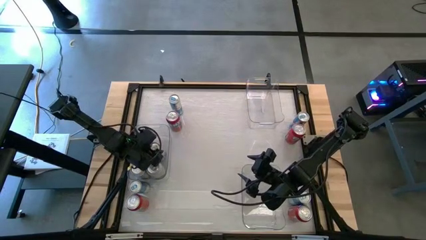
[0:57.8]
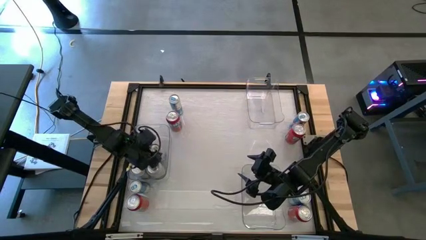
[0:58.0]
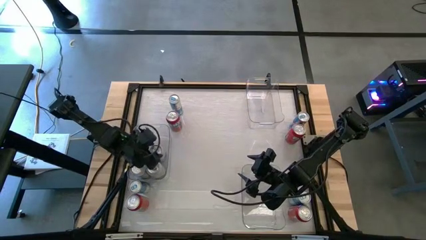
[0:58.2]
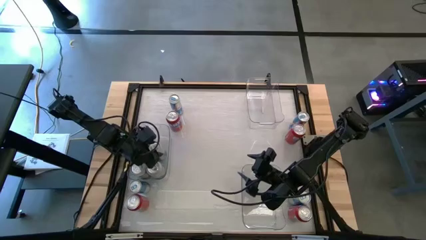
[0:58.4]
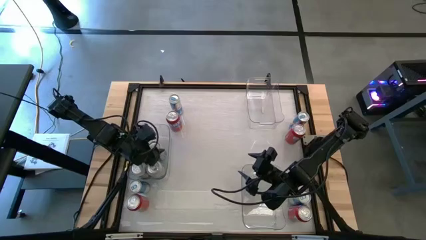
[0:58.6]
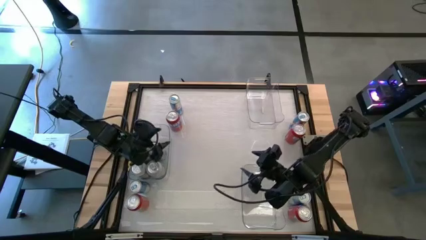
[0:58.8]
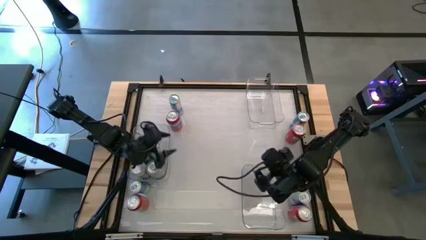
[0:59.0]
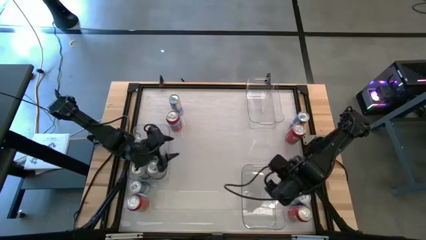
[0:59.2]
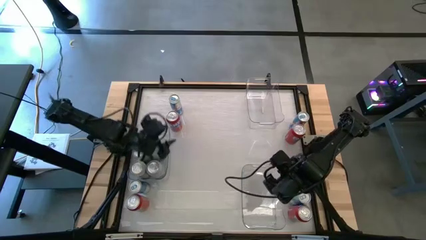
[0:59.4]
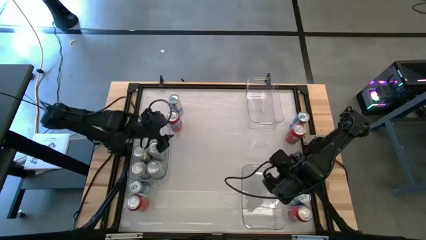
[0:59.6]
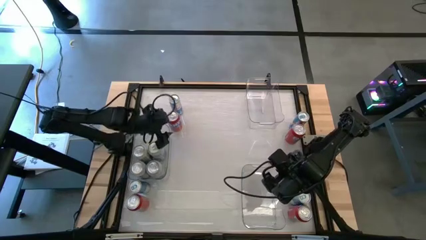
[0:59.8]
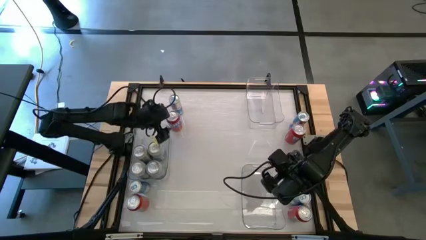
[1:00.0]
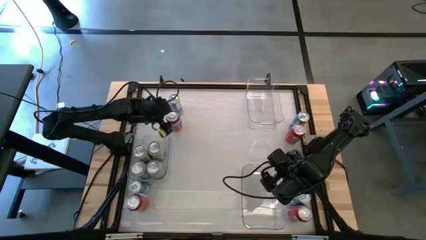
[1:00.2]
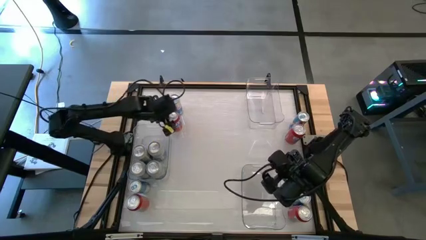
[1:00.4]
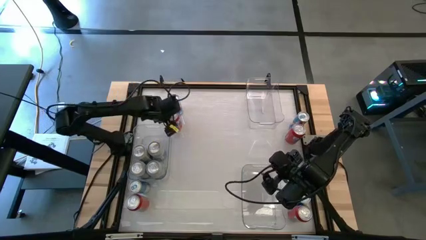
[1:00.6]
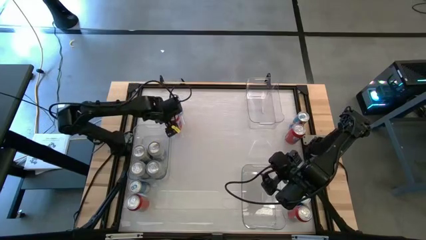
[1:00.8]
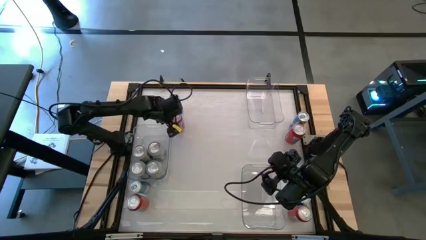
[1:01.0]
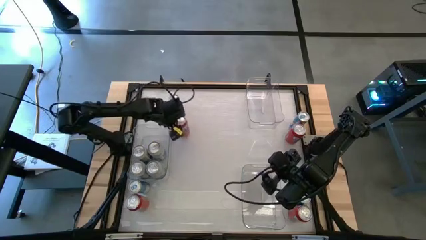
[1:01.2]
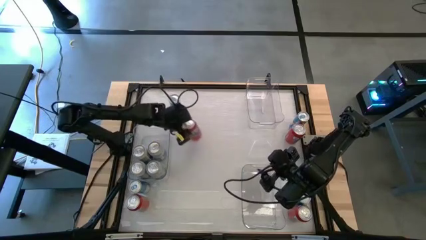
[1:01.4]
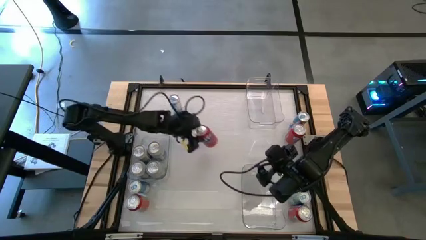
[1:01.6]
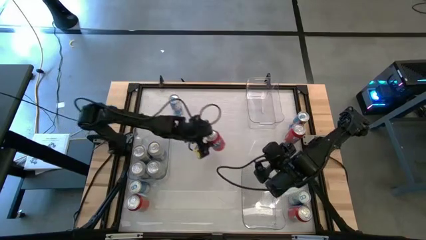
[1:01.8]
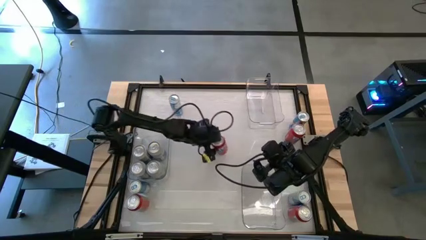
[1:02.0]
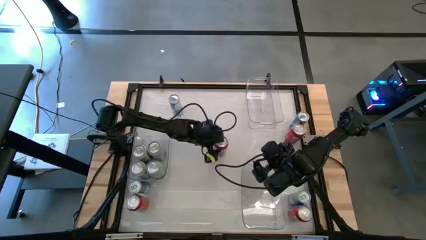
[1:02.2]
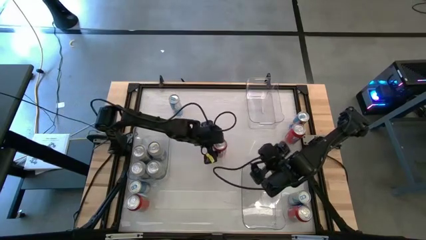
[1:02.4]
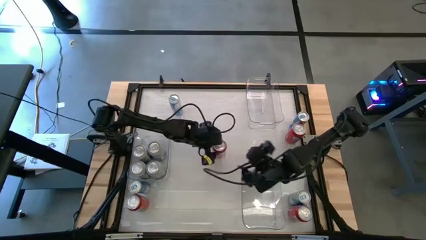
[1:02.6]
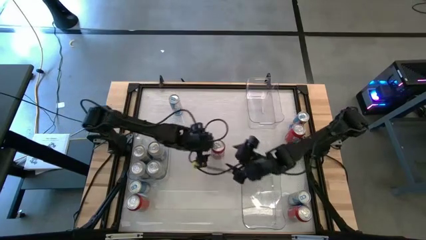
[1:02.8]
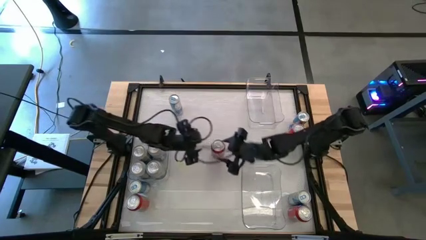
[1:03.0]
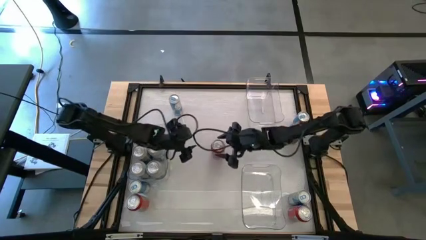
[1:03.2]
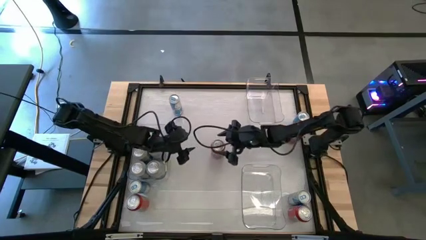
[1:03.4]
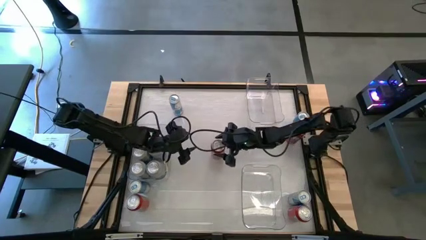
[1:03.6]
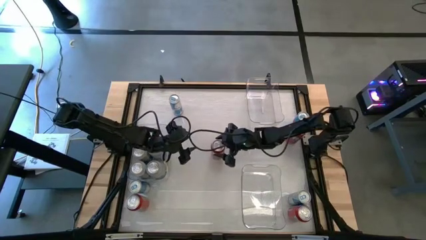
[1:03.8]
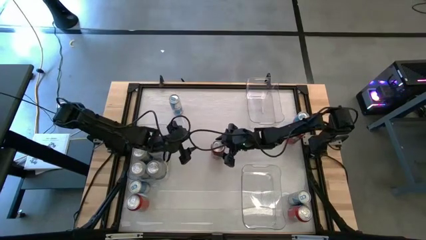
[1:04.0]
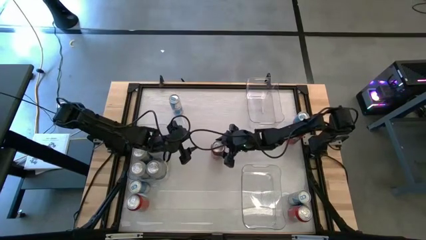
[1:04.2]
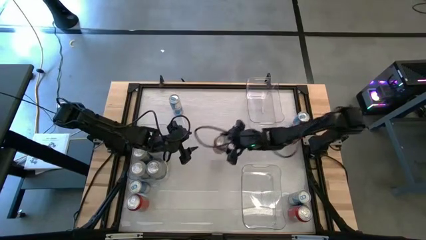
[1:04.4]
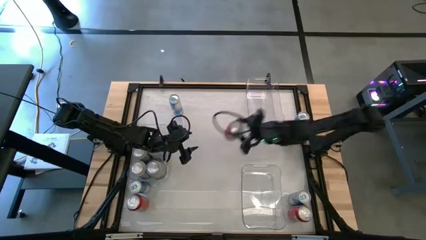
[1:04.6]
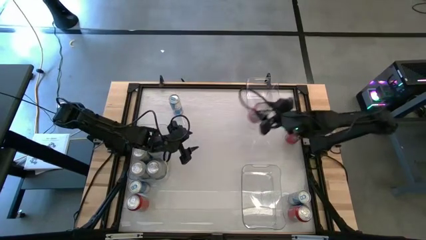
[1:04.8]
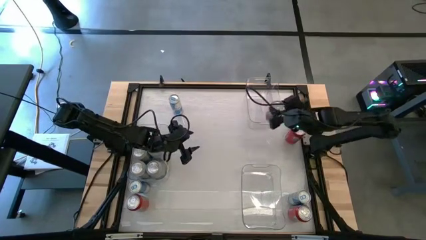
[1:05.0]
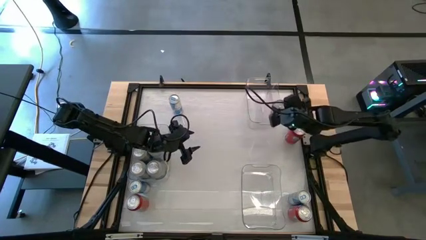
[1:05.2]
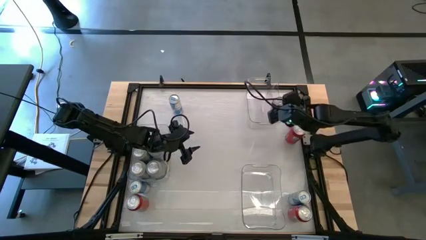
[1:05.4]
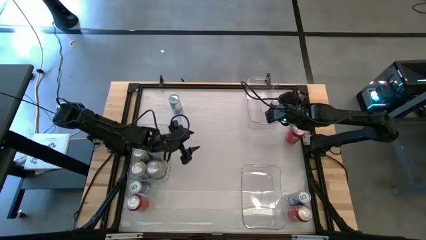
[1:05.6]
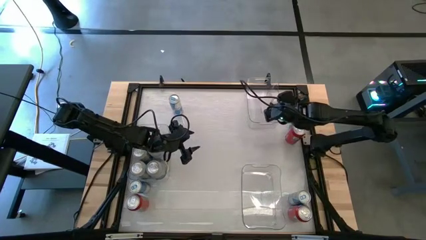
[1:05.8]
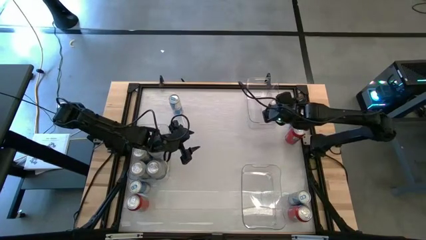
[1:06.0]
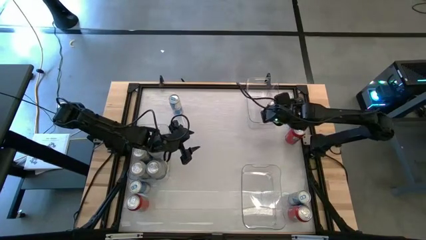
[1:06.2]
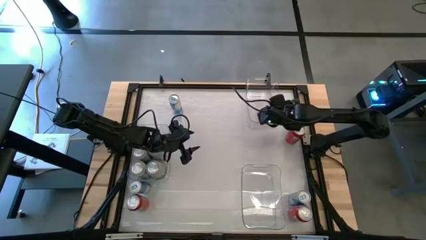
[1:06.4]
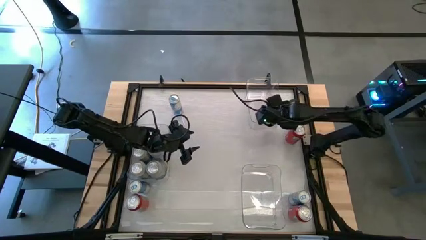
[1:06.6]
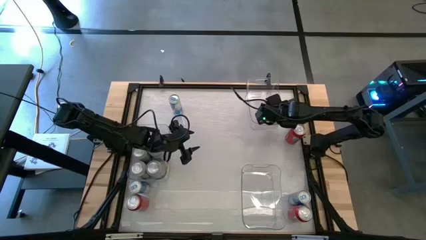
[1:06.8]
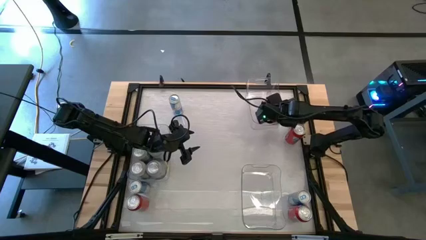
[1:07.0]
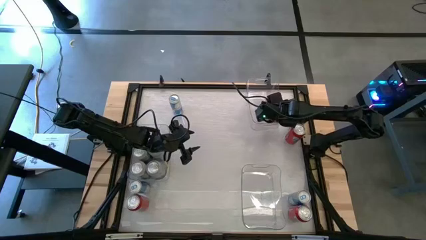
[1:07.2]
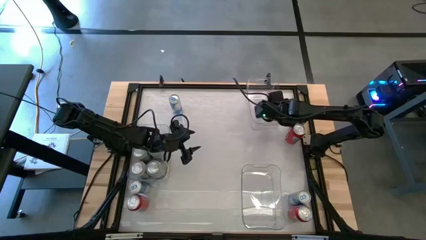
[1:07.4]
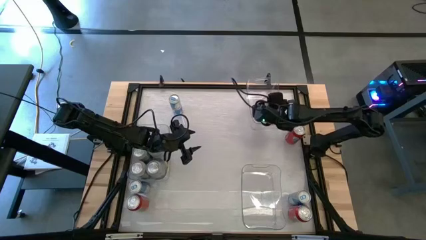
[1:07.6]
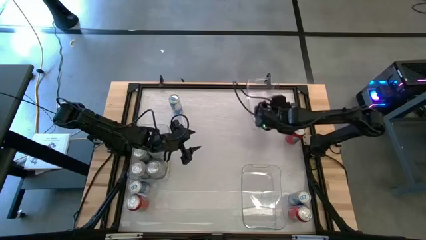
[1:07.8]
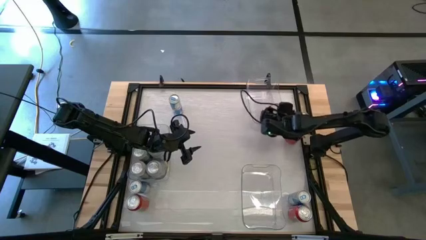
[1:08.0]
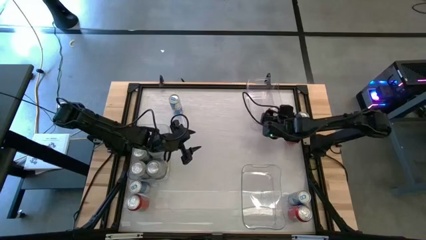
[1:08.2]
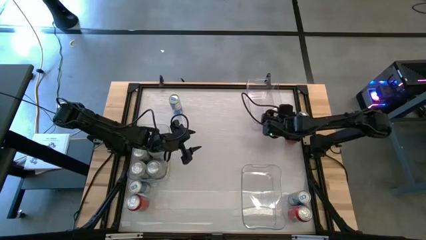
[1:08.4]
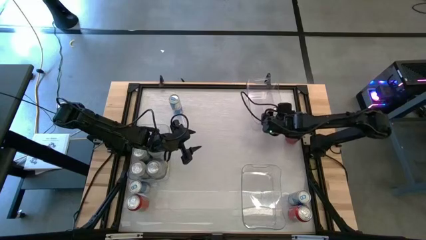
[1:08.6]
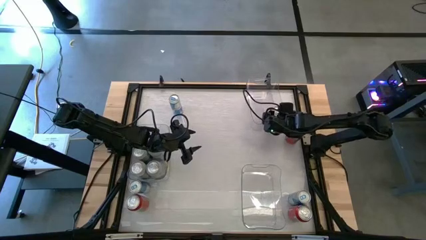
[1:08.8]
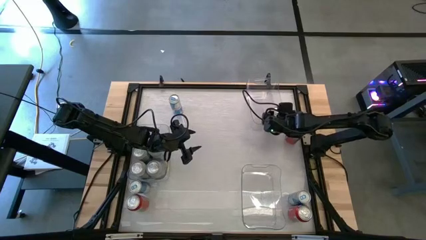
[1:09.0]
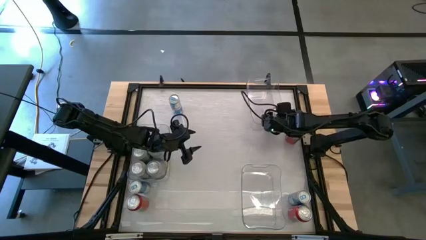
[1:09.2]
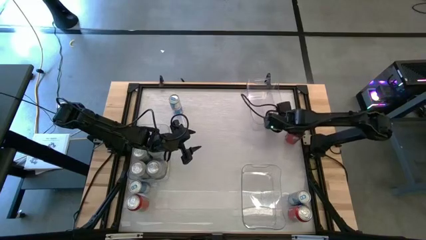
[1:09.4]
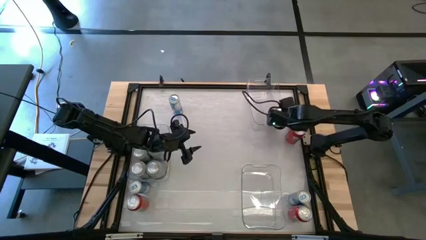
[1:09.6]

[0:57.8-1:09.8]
Task: Sort soda cans
Put the top left red soda can into the top transparent bin

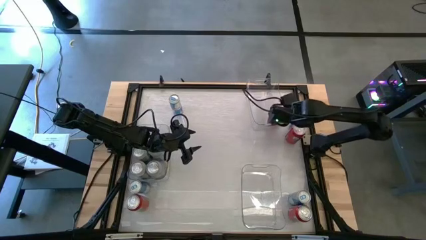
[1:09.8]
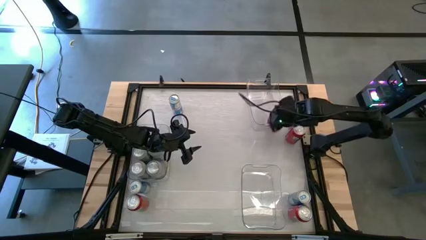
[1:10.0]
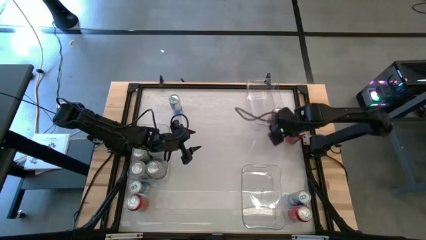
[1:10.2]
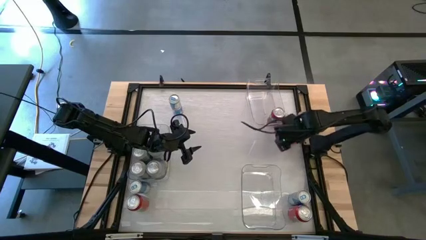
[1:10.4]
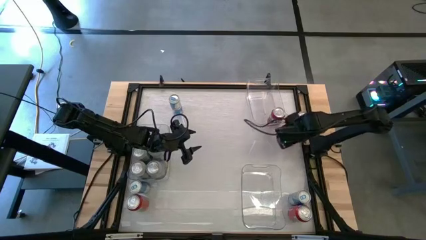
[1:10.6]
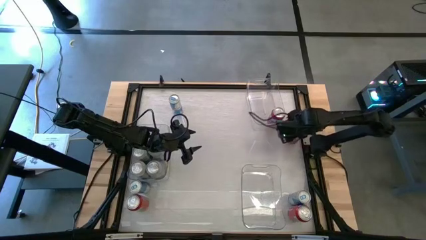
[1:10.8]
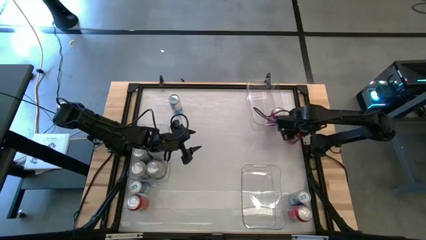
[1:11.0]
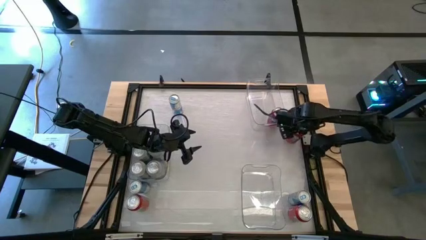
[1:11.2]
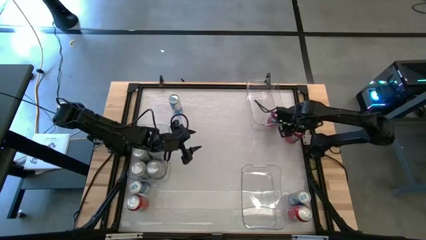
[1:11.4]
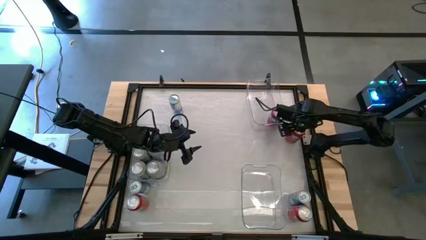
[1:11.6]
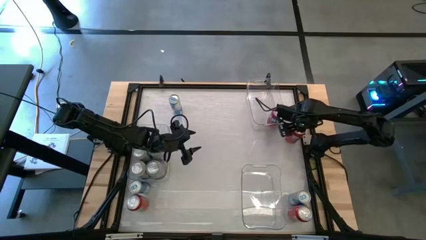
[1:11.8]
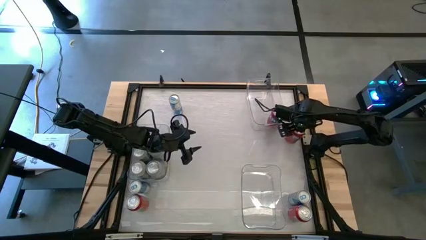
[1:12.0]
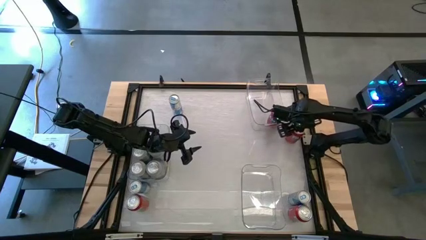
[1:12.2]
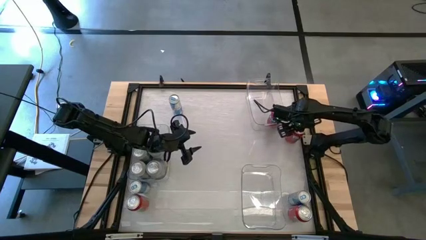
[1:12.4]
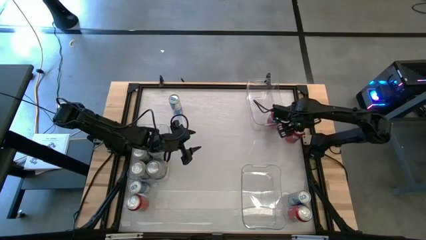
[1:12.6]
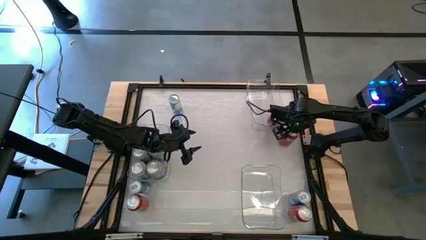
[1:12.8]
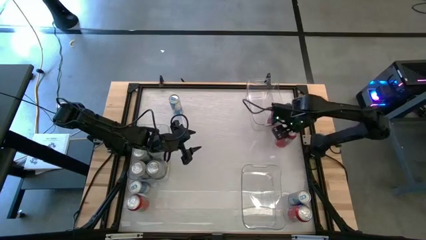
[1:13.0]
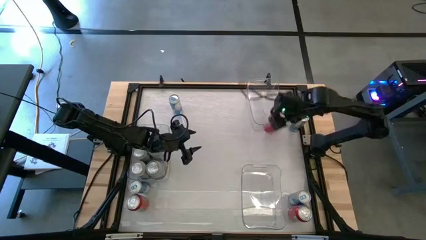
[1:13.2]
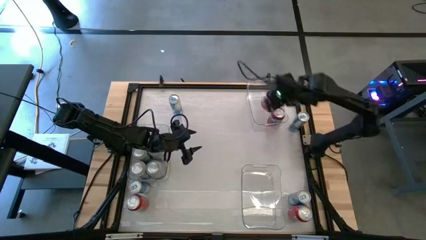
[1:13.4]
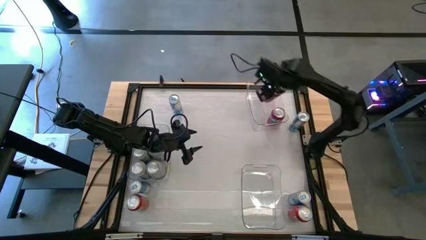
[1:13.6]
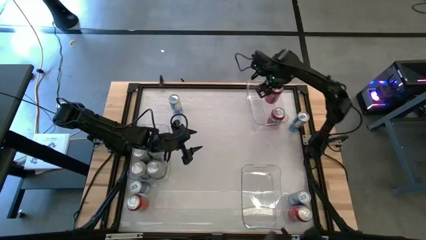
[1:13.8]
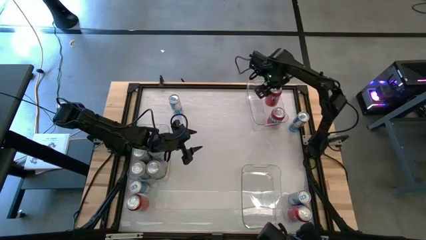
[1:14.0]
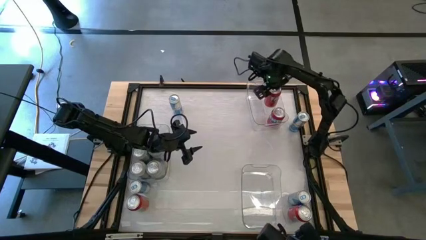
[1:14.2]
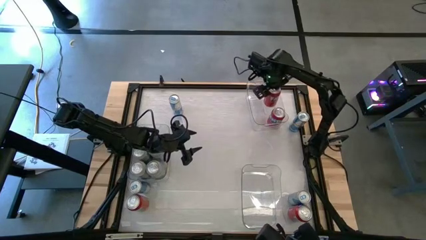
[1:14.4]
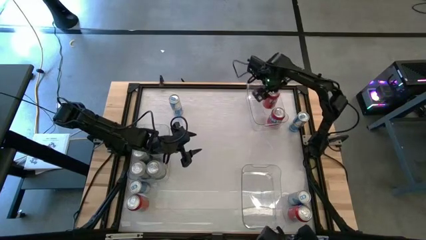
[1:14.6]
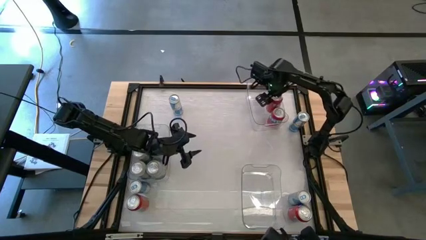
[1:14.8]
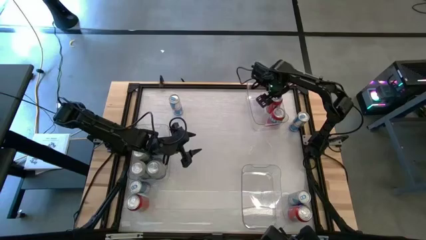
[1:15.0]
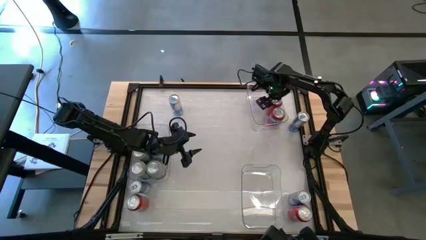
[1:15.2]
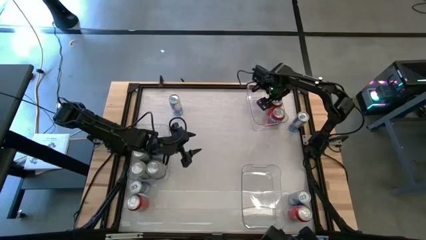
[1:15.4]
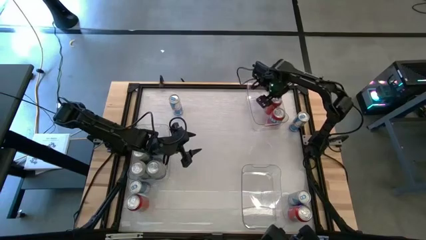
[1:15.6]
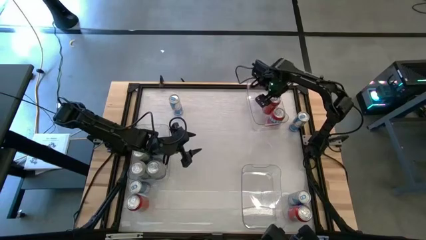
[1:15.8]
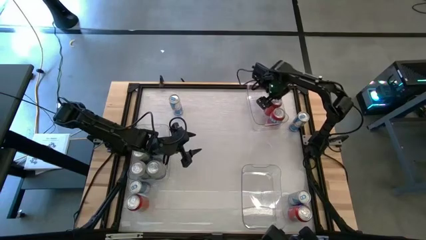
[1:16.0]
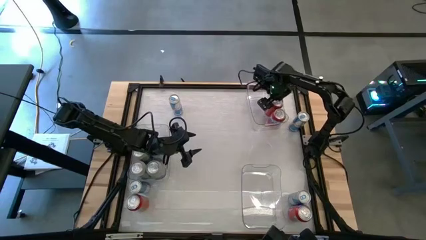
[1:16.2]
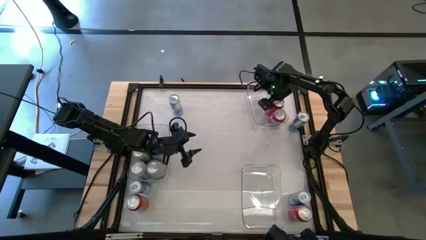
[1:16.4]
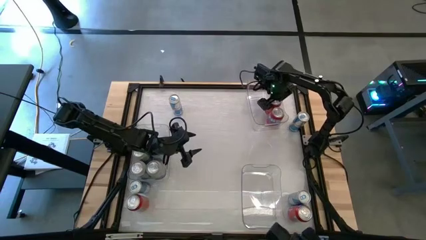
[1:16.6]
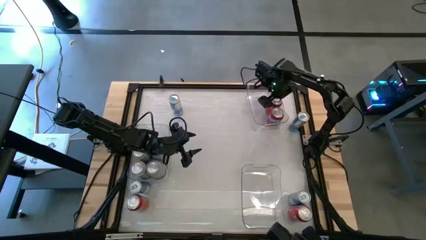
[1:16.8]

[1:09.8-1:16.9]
Put the top right red soda can into the top right transparent bin
